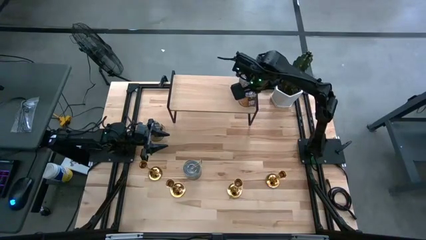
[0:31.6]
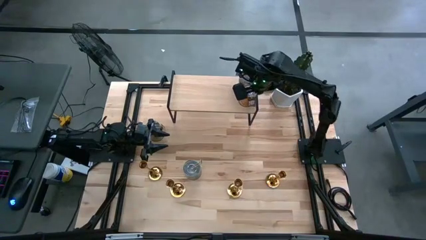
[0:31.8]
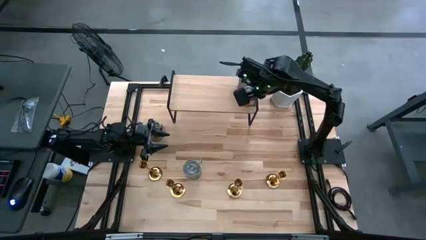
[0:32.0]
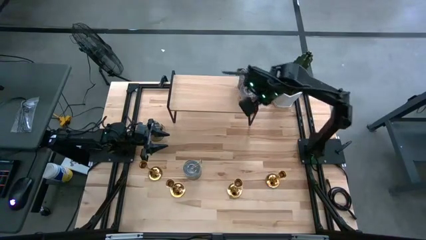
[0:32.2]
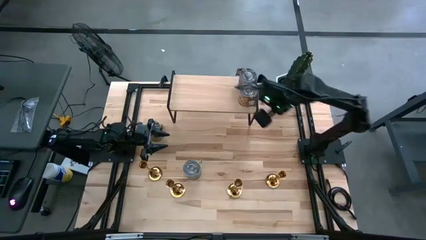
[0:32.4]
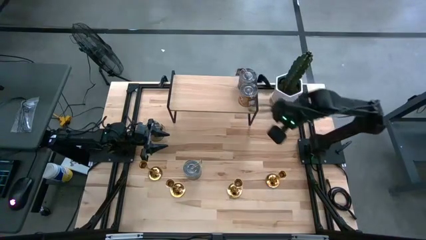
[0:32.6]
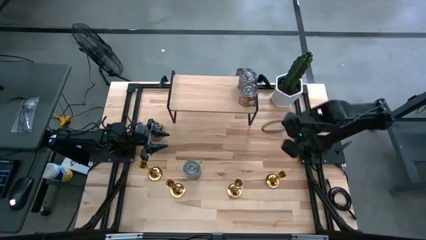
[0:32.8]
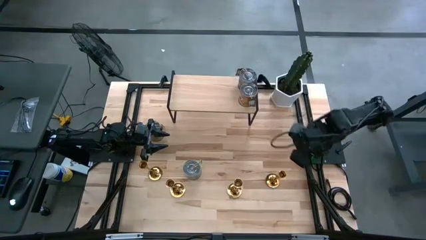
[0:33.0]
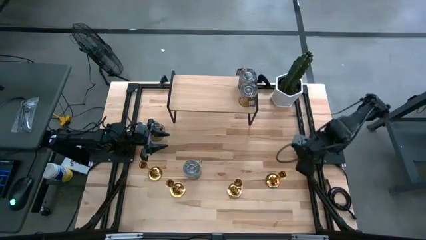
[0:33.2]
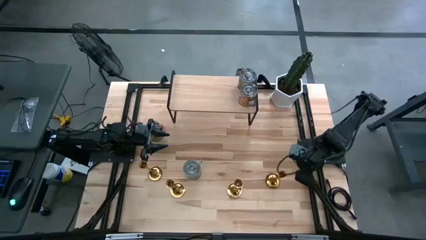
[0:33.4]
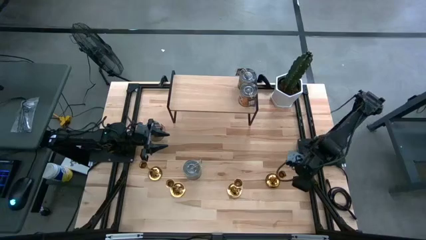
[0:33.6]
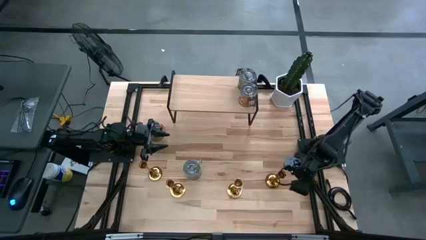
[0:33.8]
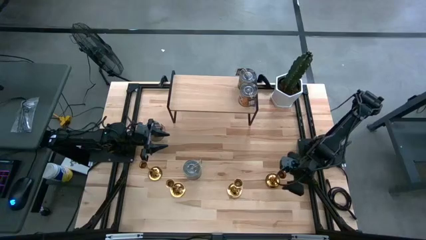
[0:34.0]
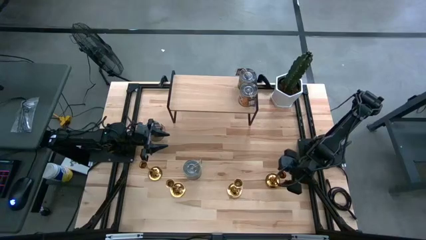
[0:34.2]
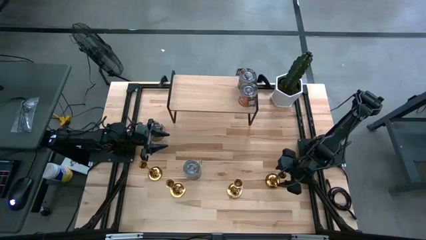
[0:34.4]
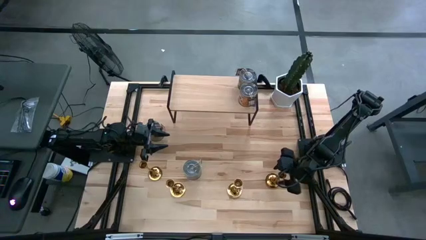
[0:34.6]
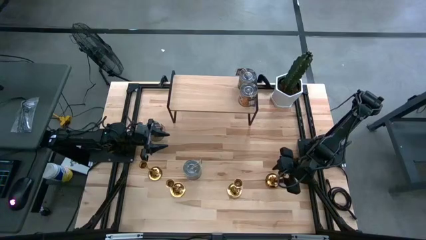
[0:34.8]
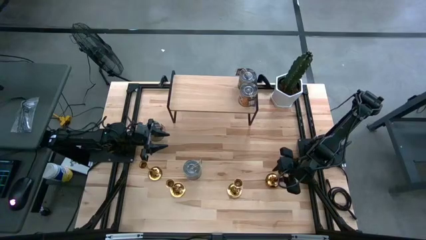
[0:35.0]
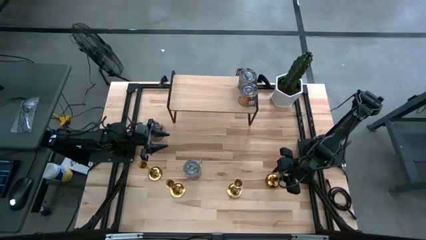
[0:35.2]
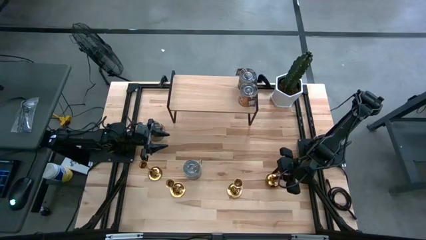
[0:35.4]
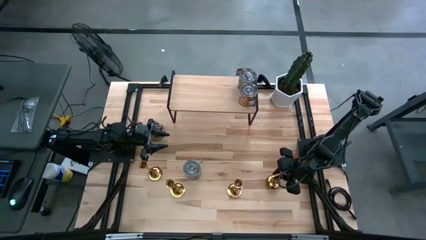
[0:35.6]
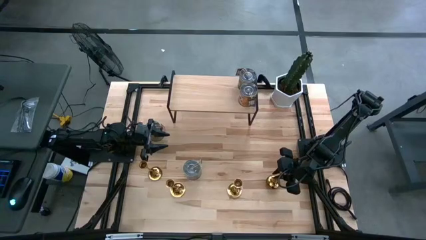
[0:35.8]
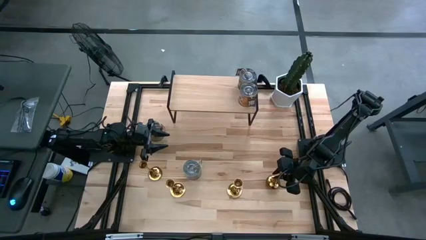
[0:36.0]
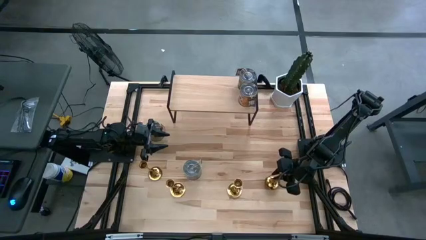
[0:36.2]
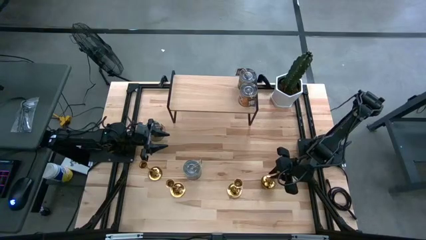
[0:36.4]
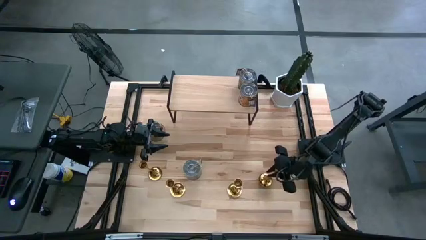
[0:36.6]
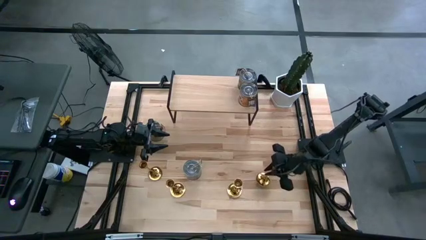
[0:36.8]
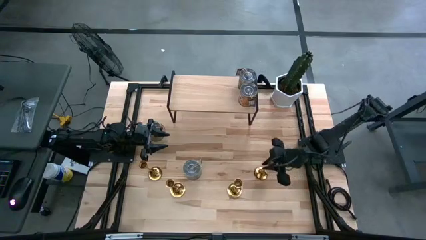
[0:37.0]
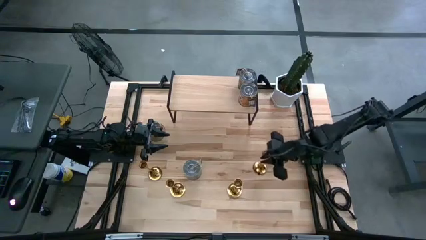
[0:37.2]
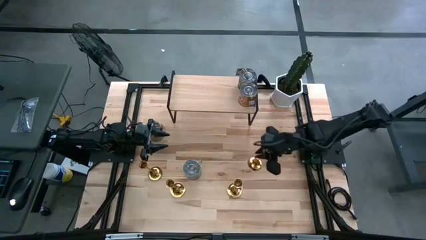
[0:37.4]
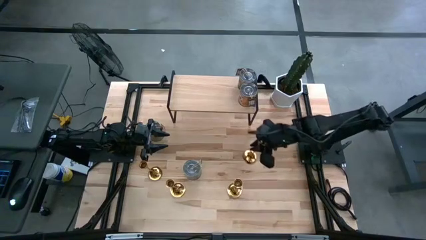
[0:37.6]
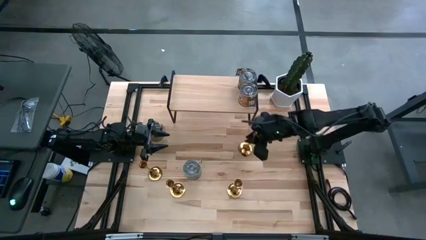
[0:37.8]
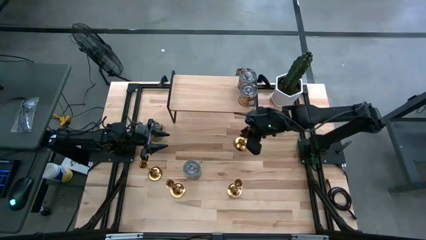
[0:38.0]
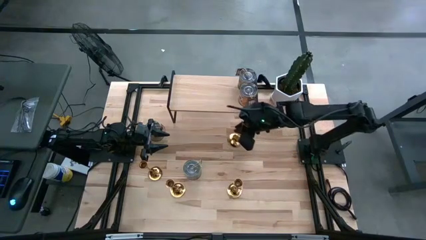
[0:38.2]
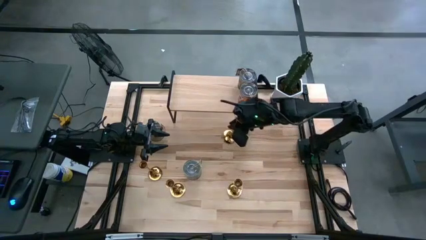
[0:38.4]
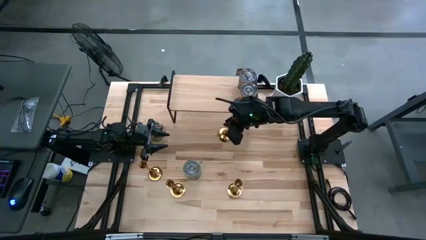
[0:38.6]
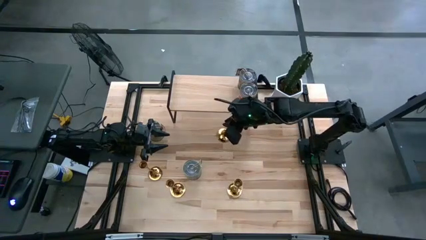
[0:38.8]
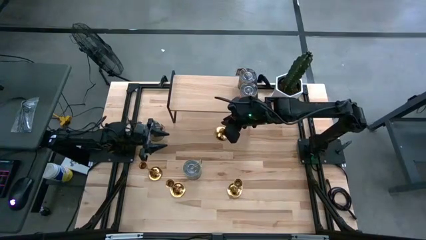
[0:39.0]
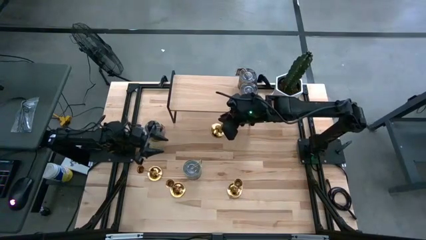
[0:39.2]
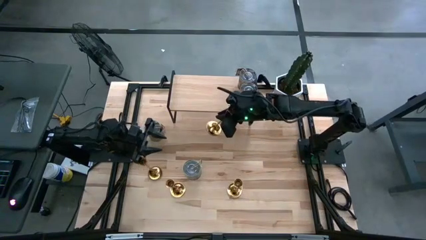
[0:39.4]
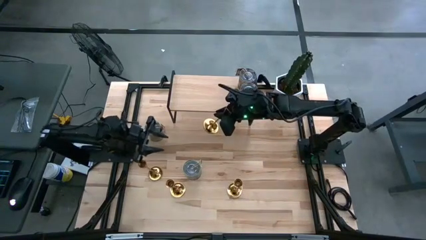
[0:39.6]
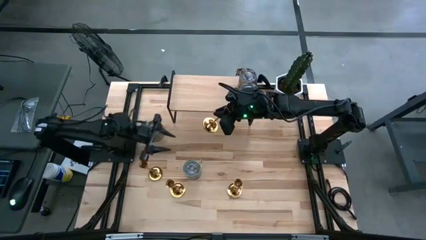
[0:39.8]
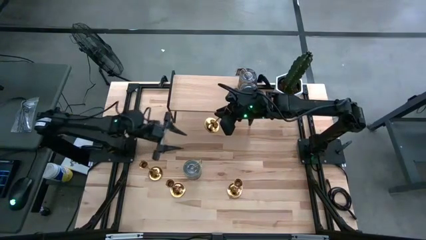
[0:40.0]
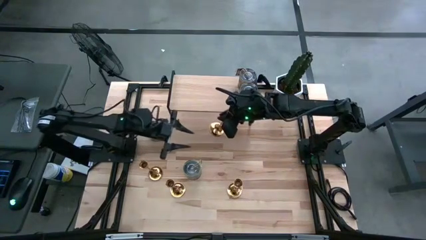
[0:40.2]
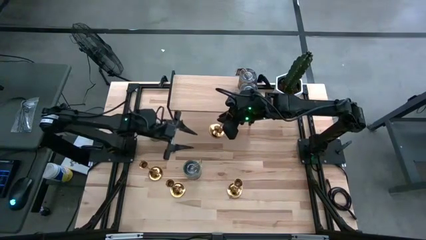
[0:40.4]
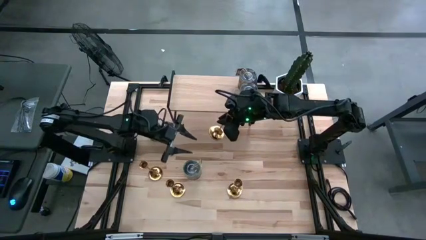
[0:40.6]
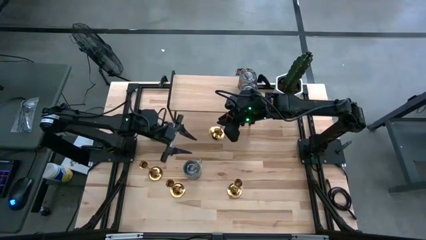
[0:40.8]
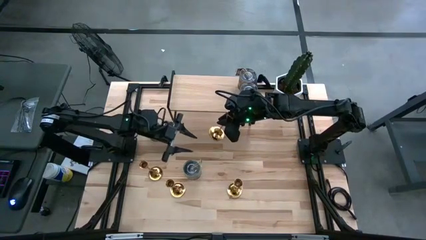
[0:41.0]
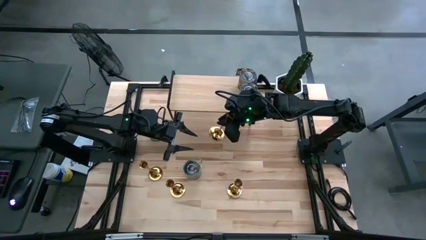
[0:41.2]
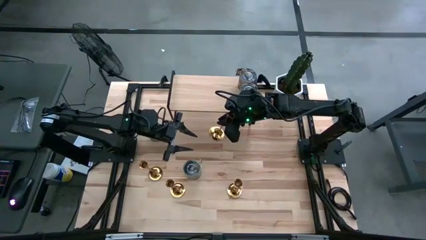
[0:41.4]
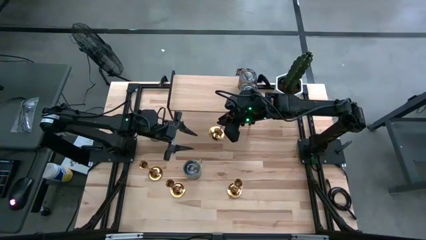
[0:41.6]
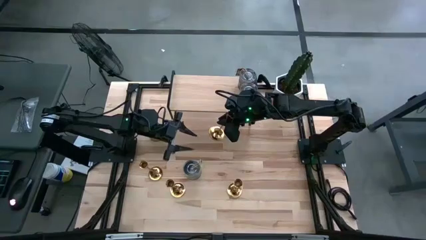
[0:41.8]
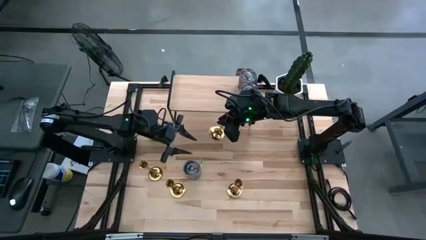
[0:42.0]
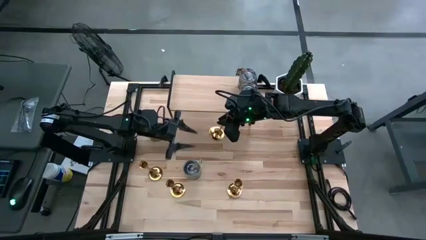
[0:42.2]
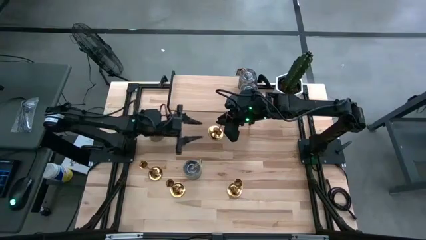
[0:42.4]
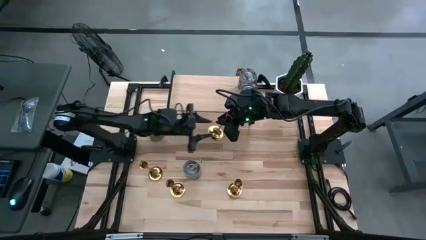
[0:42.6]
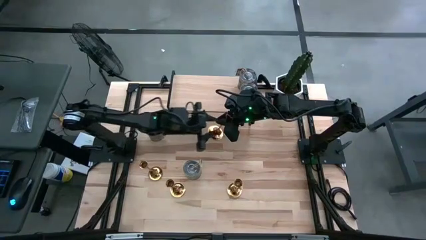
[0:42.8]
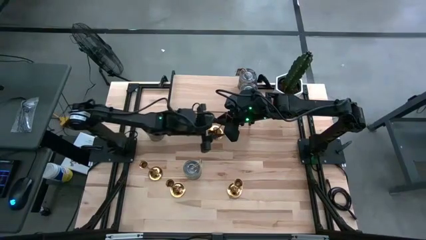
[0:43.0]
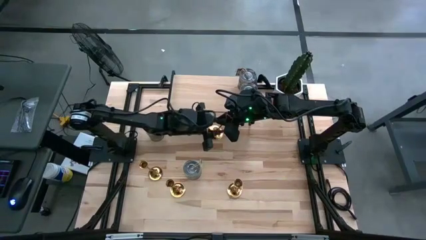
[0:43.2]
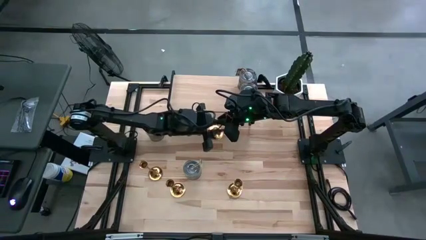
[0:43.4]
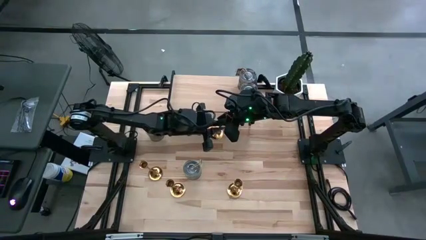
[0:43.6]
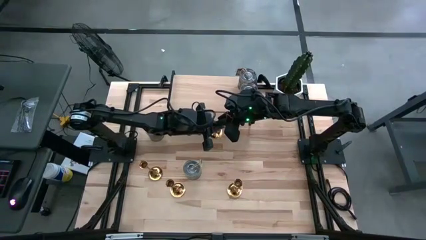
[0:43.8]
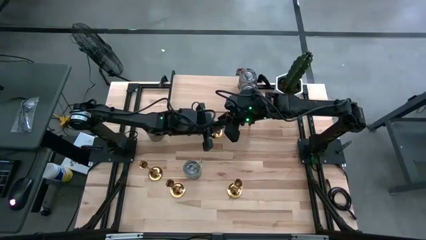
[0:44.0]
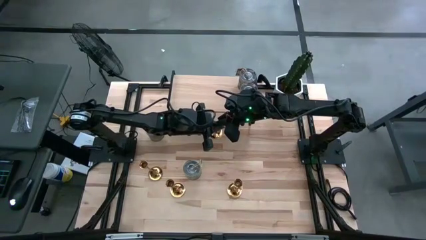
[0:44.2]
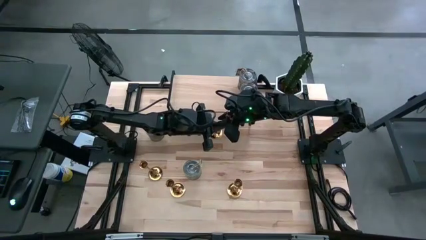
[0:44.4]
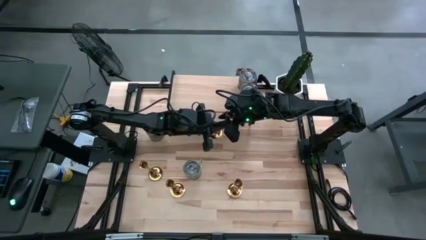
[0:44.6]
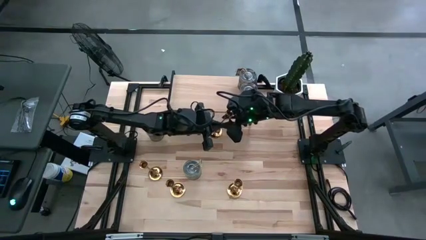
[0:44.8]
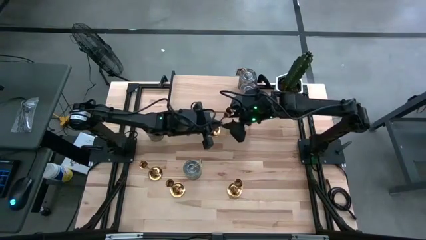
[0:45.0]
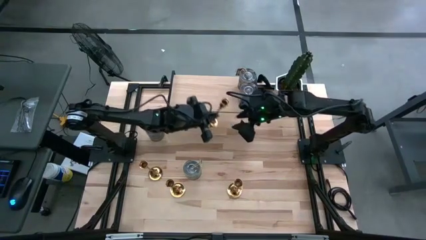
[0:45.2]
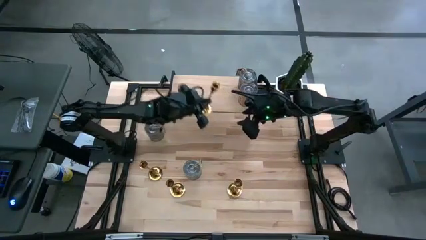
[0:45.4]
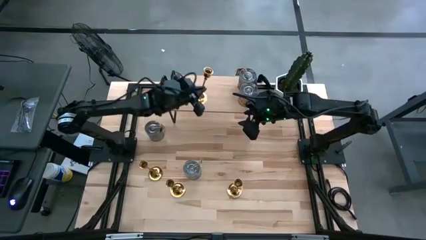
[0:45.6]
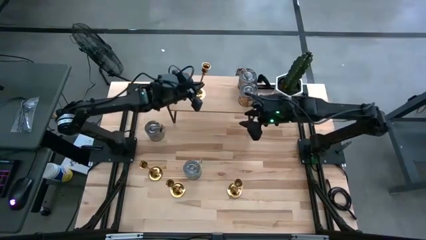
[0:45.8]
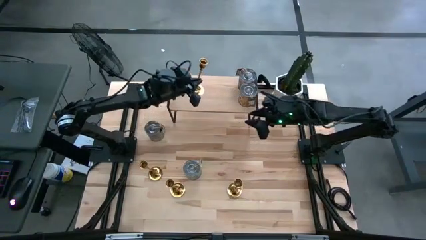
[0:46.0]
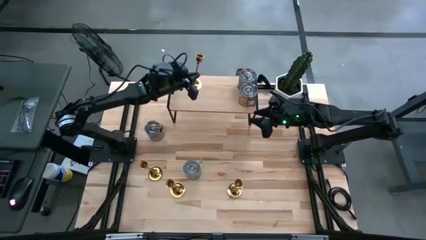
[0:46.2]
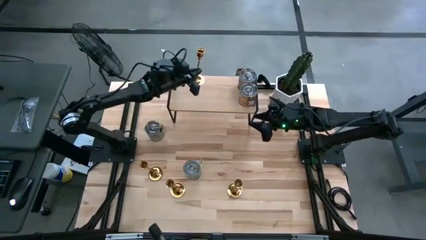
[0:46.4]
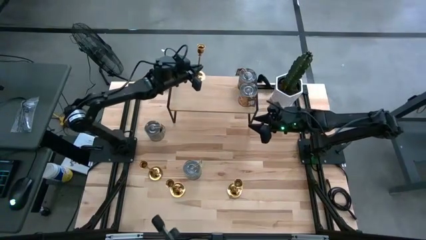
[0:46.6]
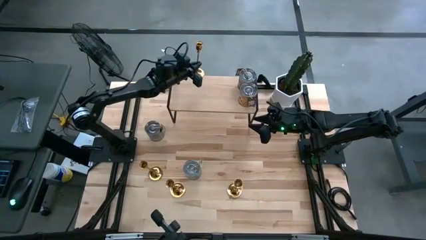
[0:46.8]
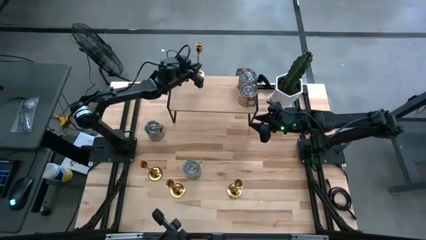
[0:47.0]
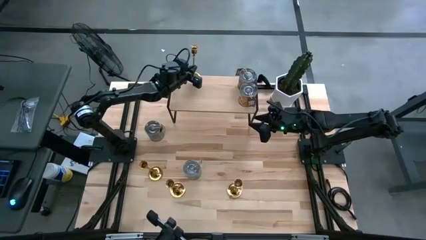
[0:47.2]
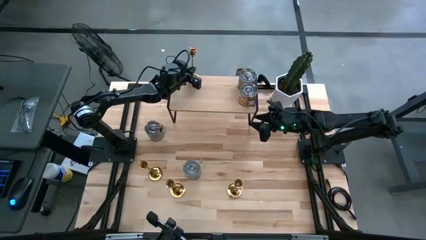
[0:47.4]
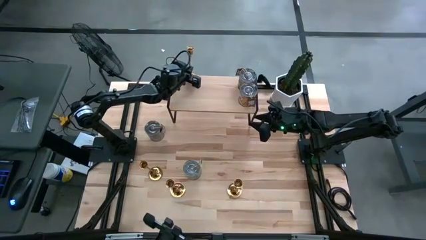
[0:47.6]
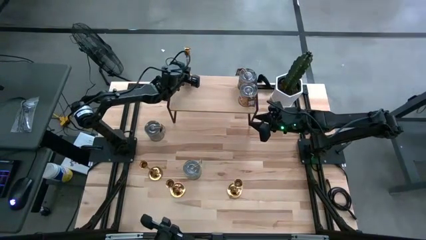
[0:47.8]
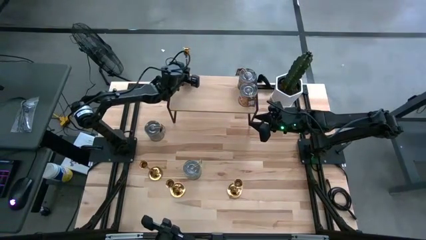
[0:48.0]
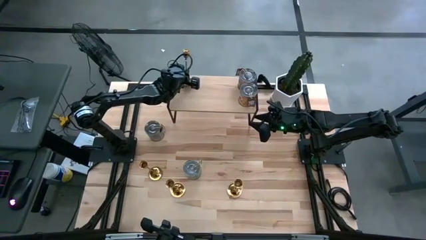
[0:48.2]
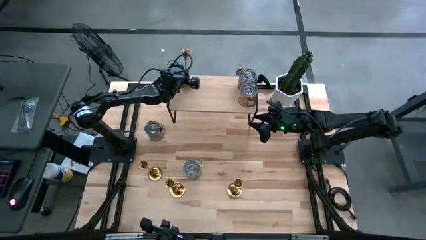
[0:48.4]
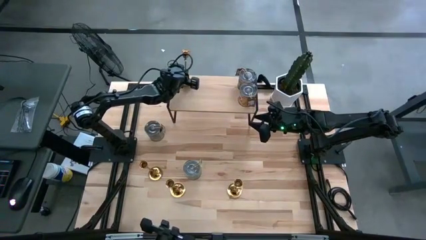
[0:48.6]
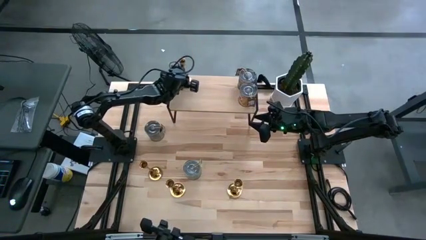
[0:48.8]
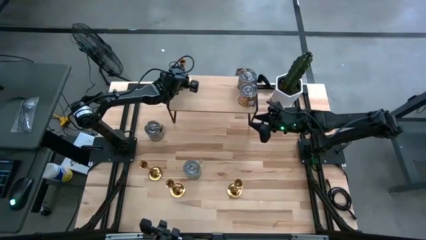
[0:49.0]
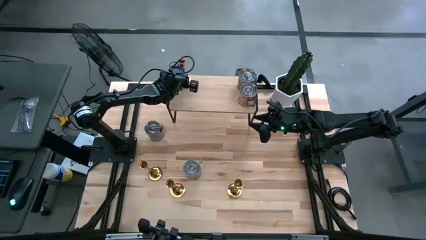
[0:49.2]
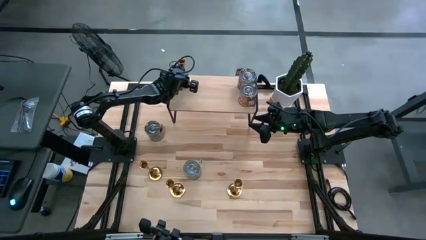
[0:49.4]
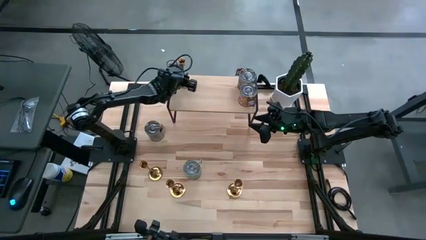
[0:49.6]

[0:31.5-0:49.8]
Task: Pick & Place candle stick holders
Put the gold candle holder on the shelf
